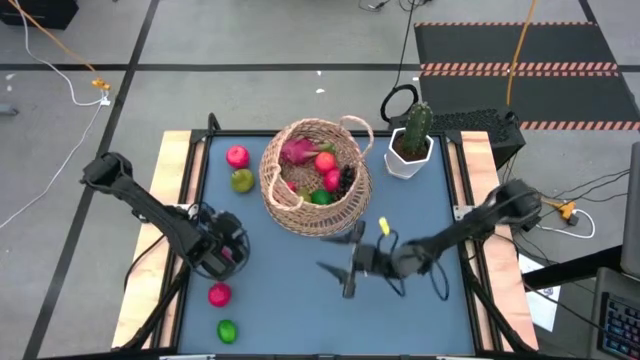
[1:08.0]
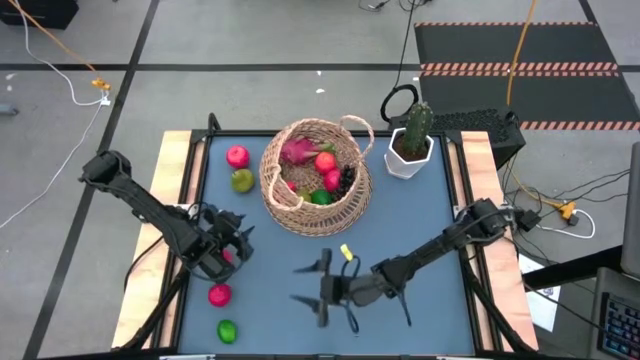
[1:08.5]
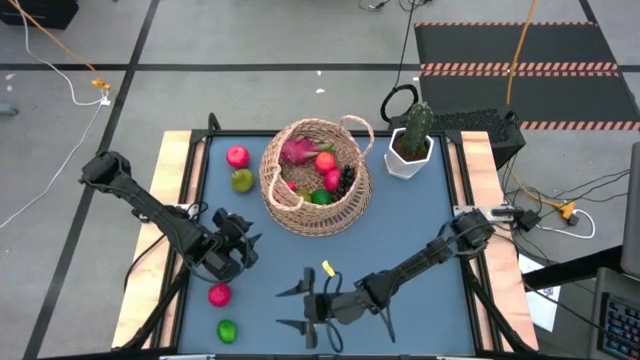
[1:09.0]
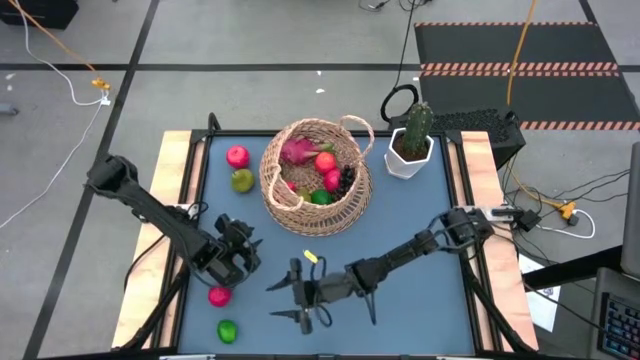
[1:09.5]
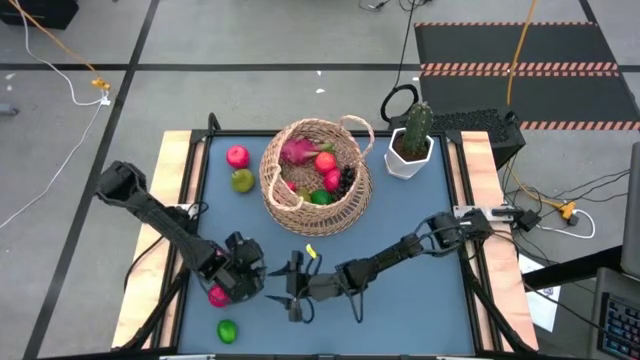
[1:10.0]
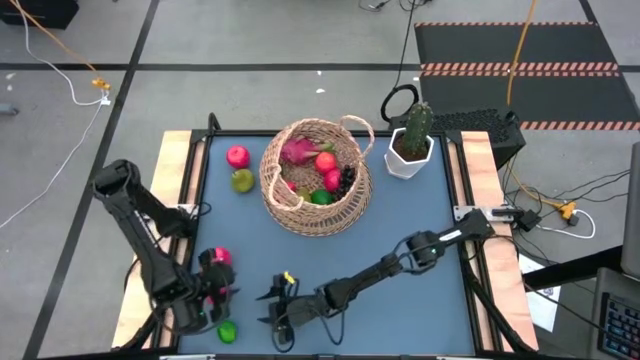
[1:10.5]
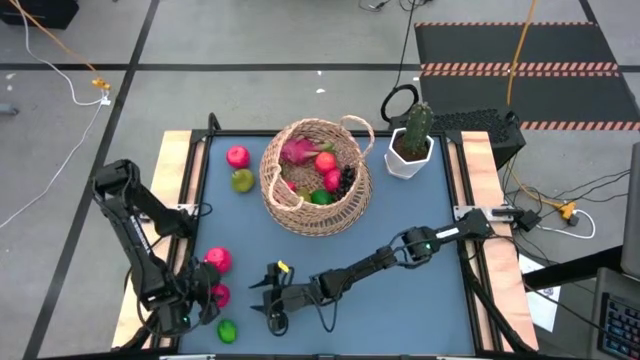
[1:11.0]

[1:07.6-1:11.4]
Task: Build produce basket
Put the tomato into the brown basket

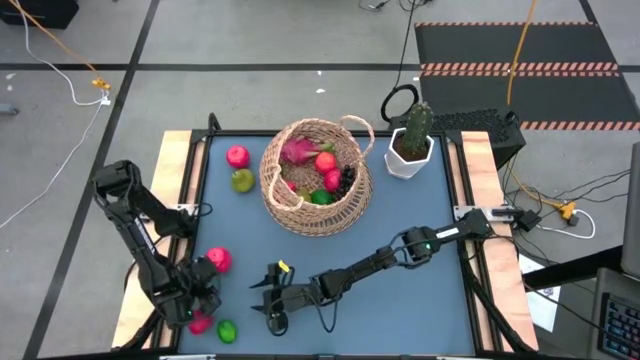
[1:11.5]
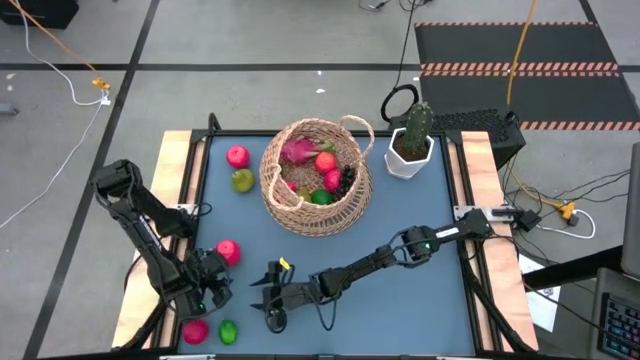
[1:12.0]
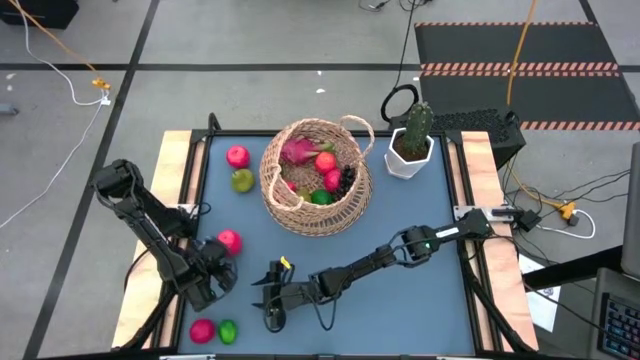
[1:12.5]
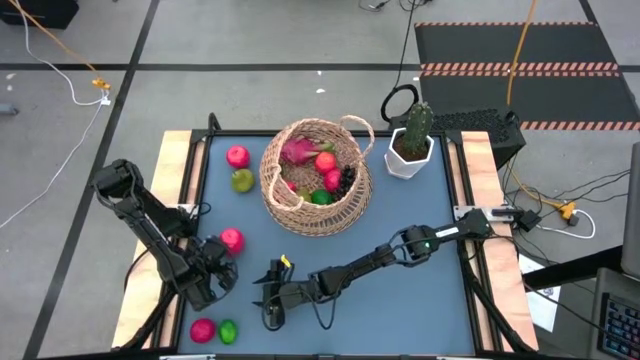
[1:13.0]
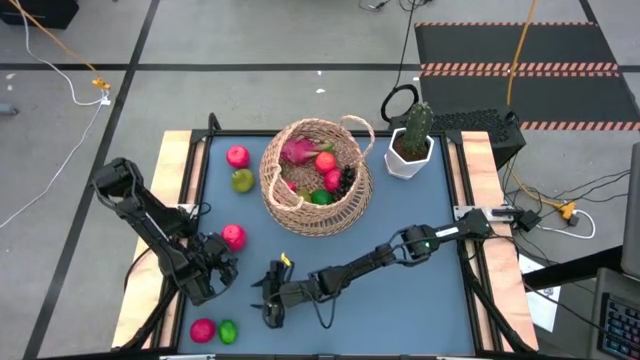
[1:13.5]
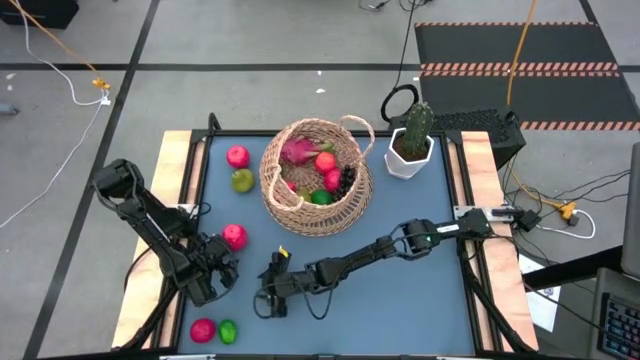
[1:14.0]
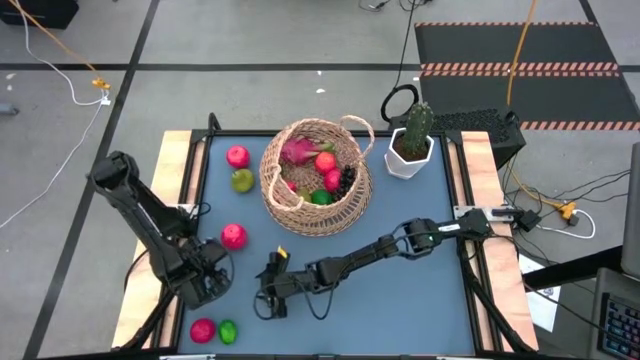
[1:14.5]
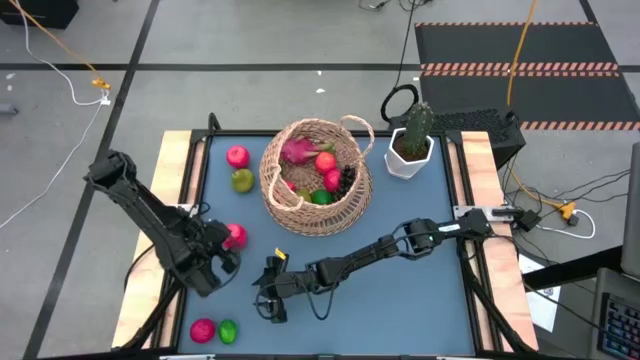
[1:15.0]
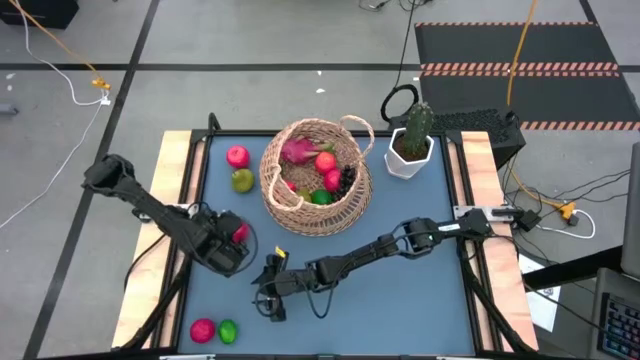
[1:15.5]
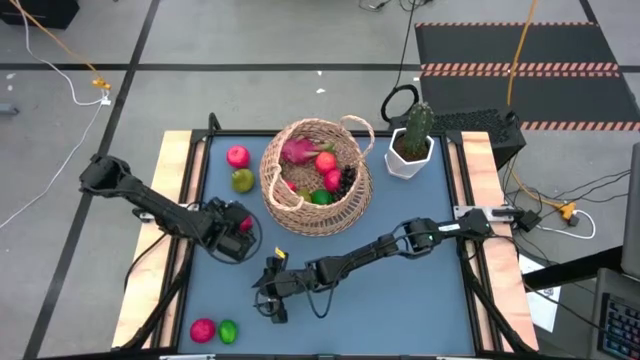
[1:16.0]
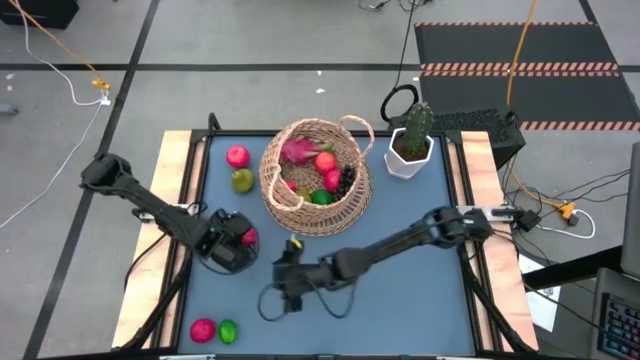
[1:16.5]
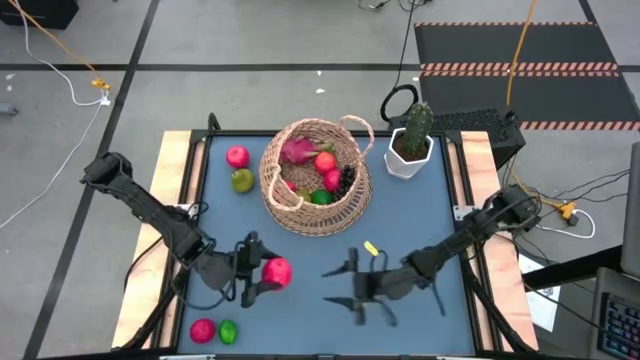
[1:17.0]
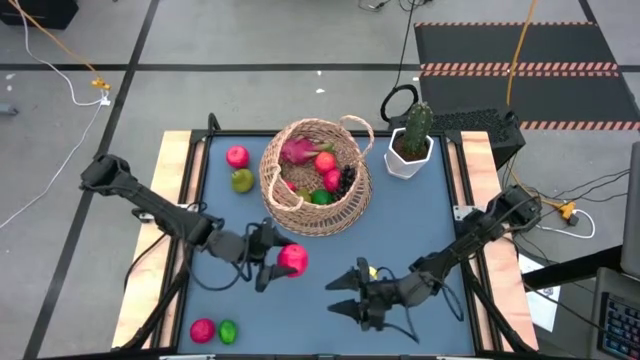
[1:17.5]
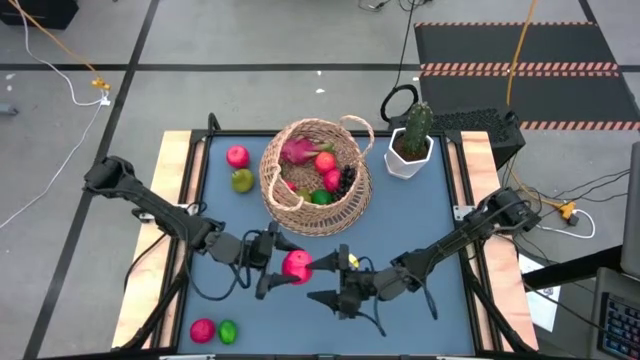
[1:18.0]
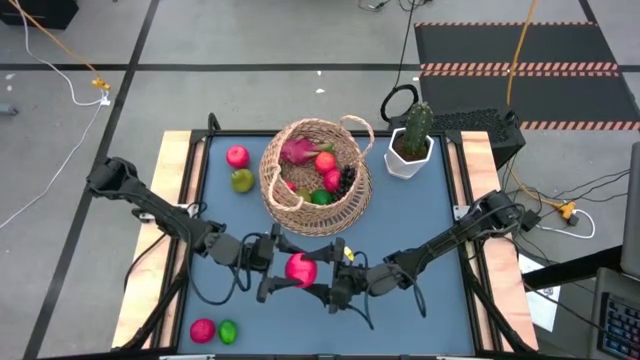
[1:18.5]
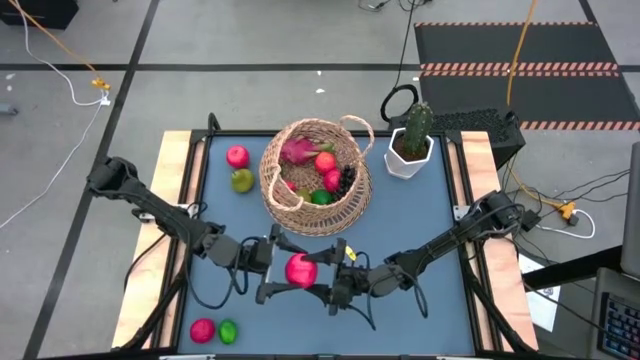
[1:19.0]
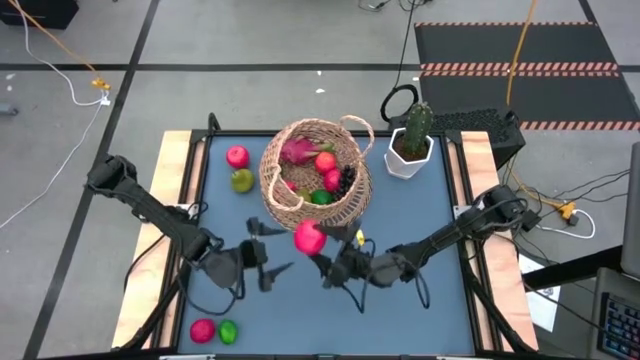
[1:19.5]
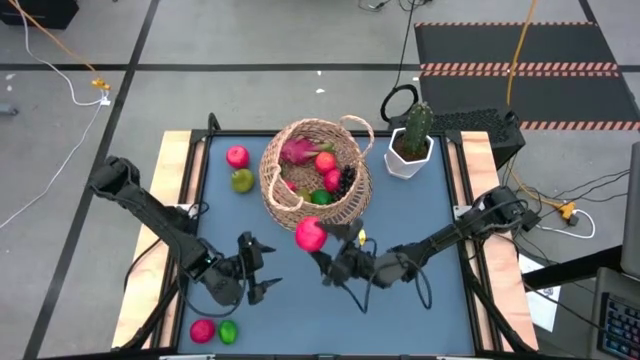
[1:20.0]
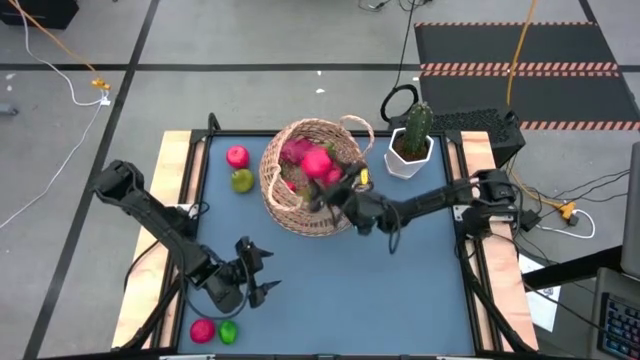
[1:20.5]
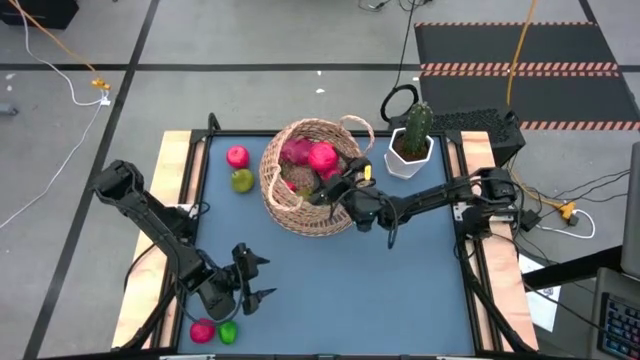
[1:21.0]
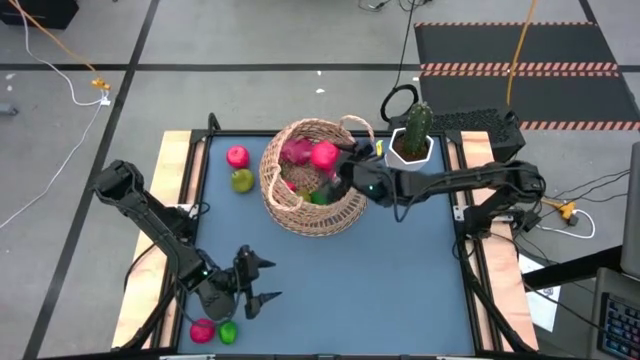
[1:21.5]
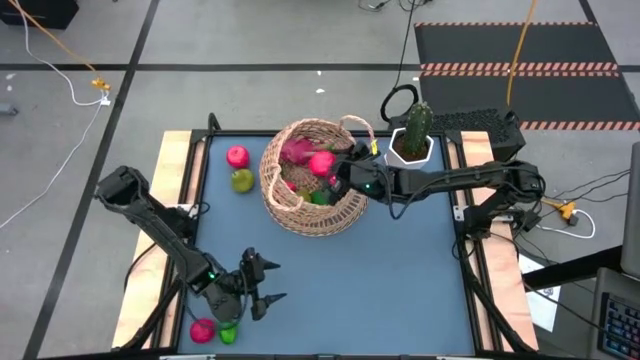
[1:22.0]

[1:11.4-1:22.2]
Put the apple into the brown basket

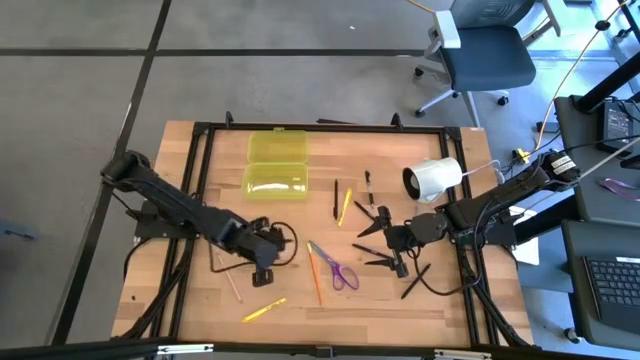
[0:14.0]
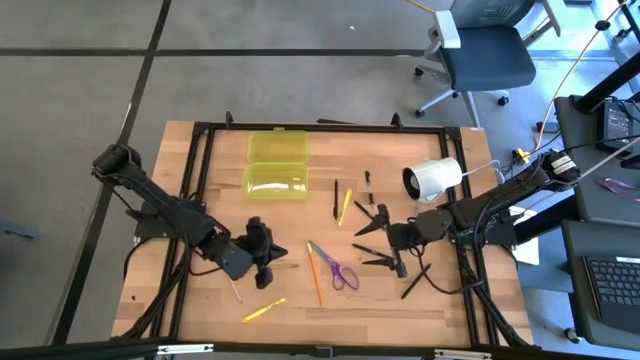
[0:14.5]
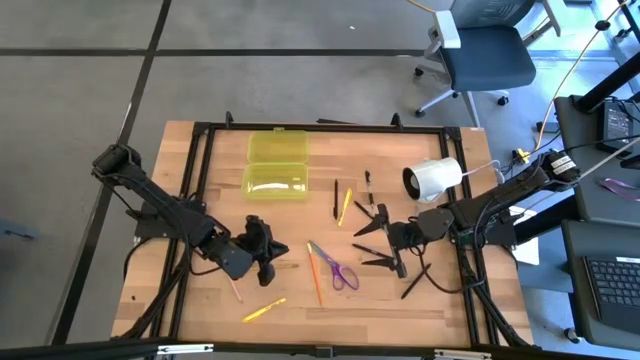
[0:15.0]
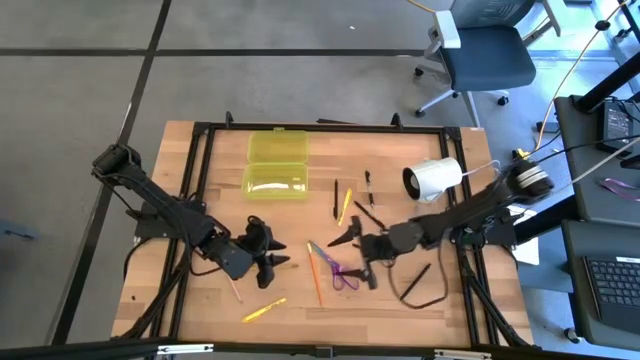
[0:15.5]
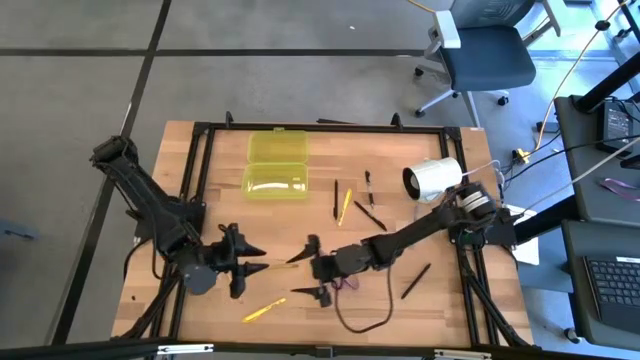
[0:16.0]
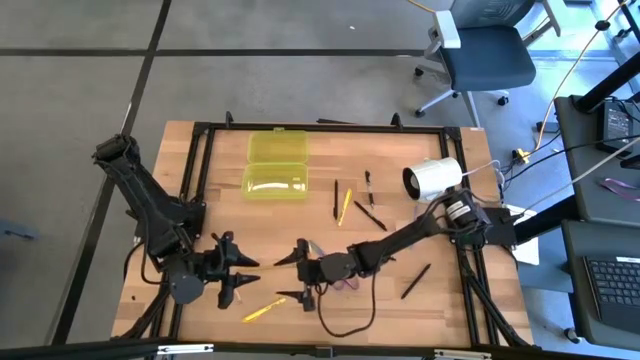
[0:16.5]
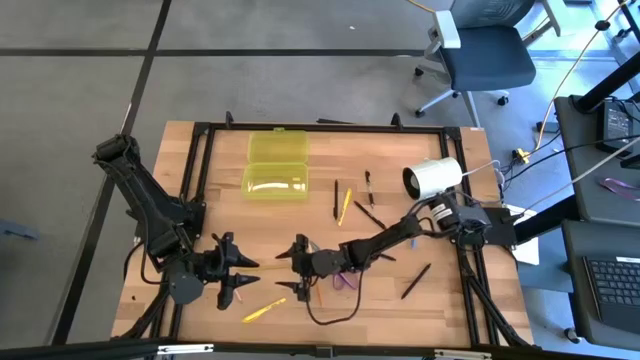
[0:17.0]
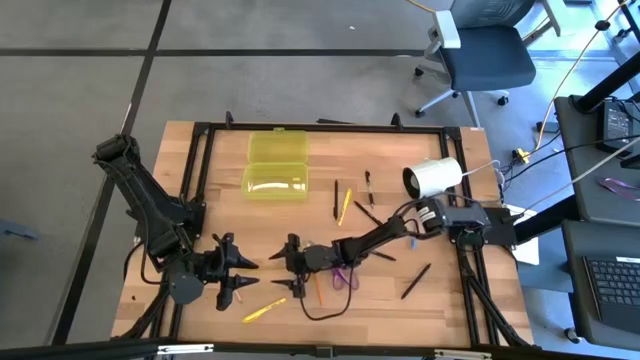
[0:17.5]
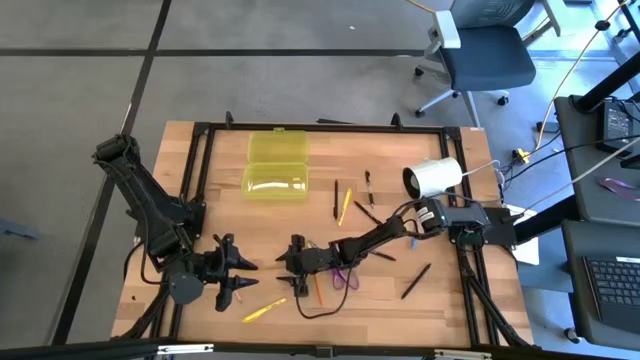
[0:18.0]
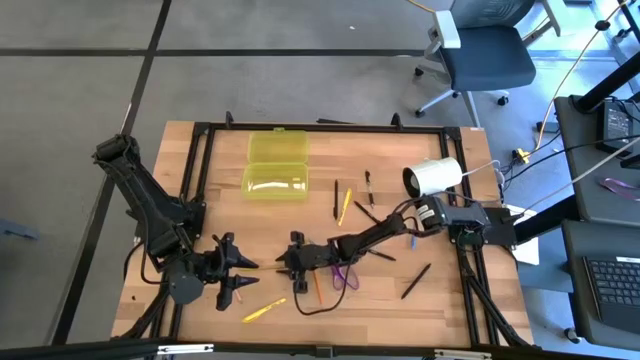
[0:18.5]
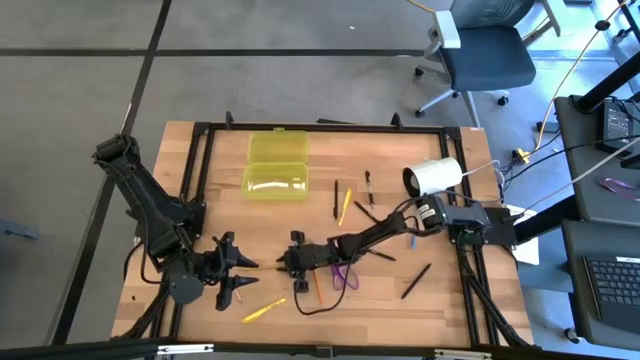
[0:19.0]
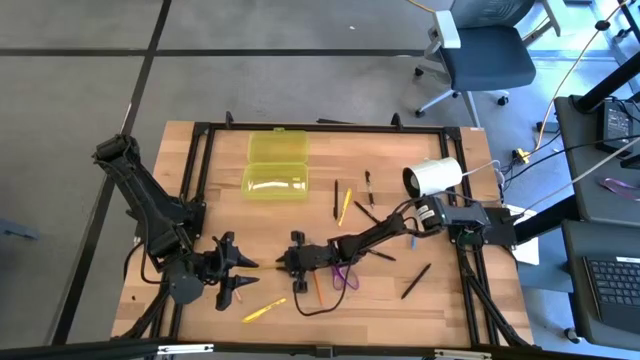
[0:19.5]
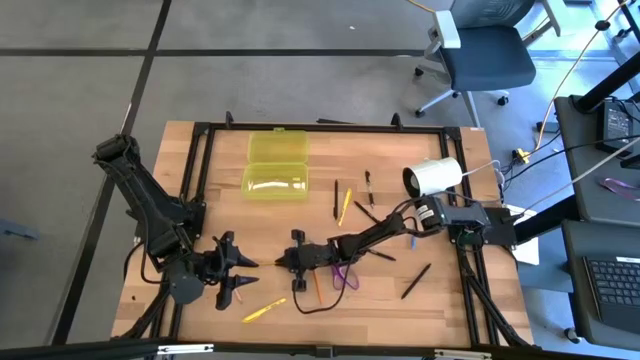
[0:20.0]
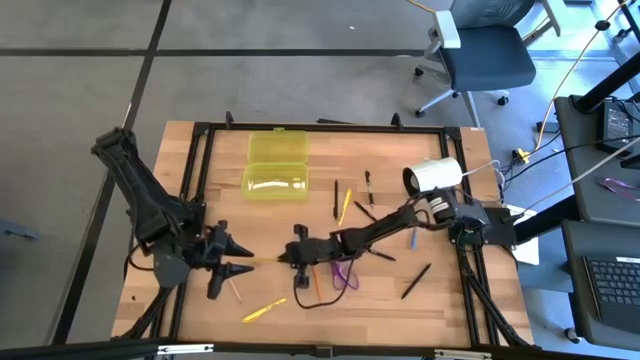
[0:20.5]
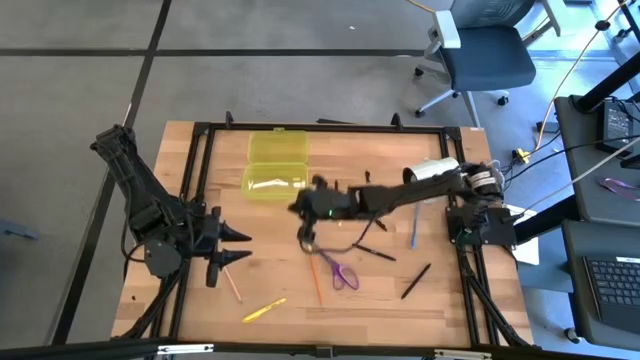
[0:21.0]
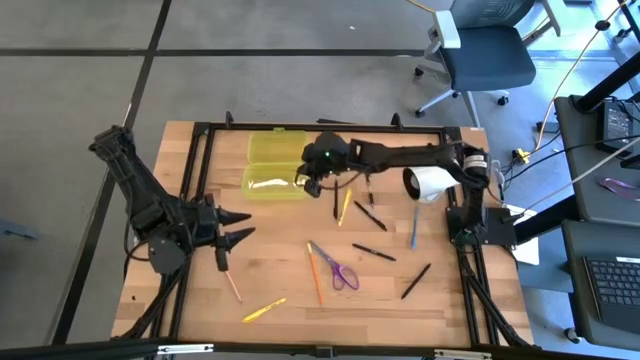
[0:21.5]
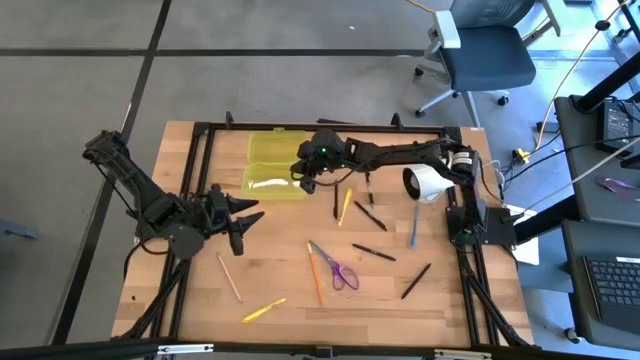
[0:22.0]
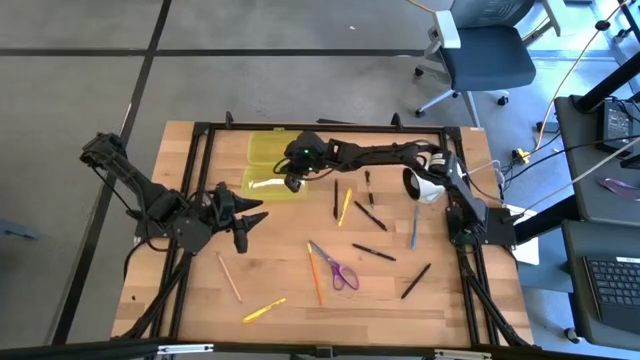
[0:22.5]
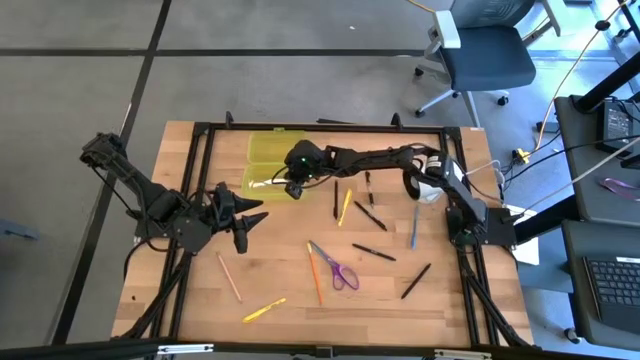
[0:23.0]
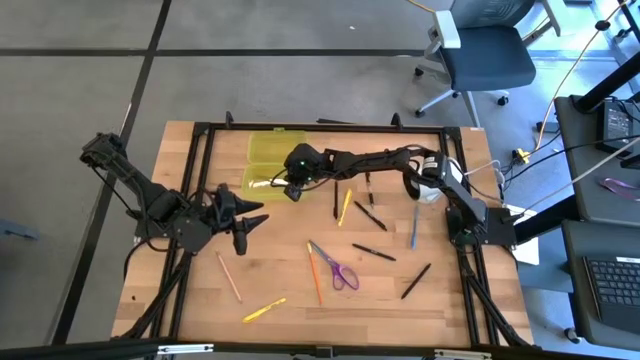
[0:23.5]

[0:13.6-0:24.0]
Task: Pick & place school supplies into a supply box
Put the yellow pencil into the yellow supply box
